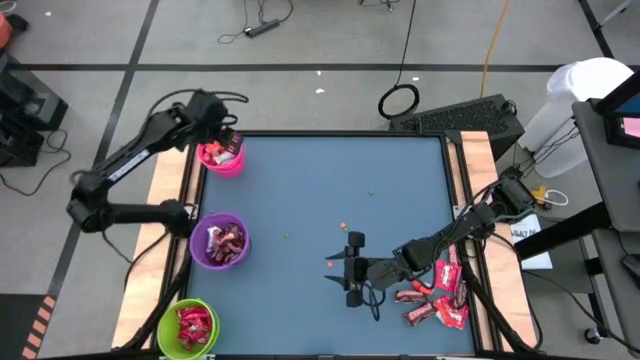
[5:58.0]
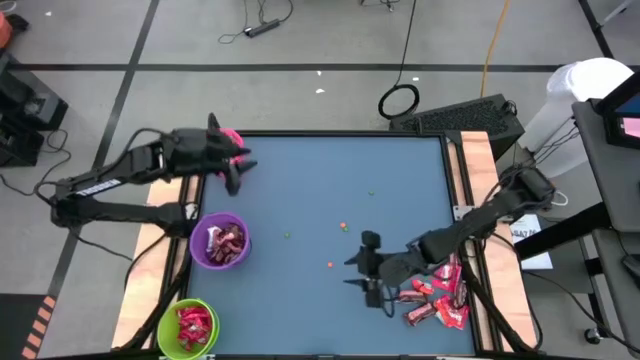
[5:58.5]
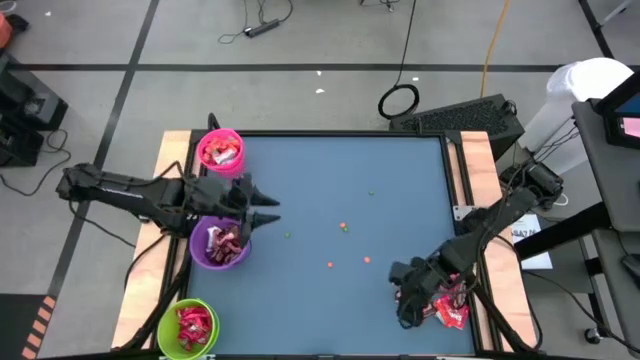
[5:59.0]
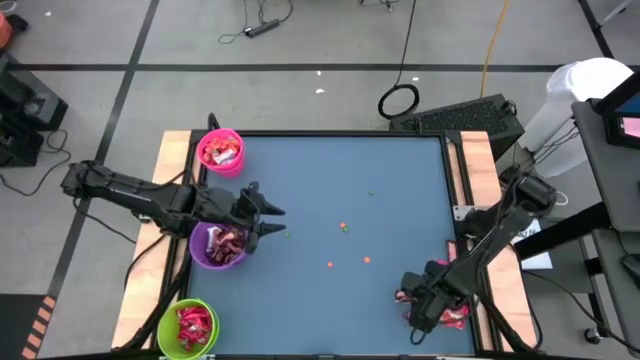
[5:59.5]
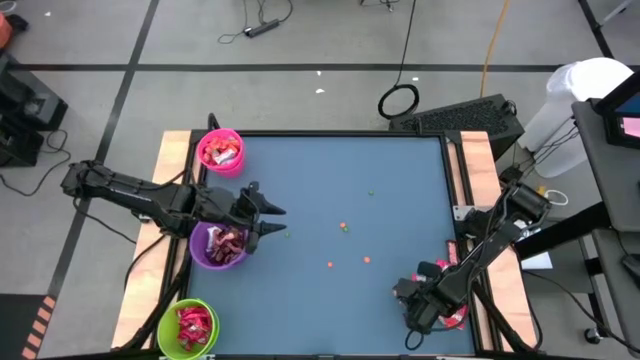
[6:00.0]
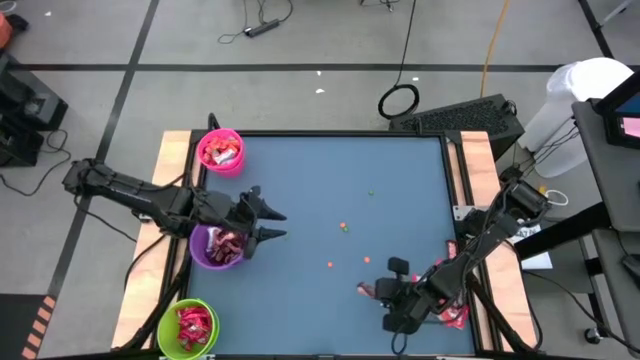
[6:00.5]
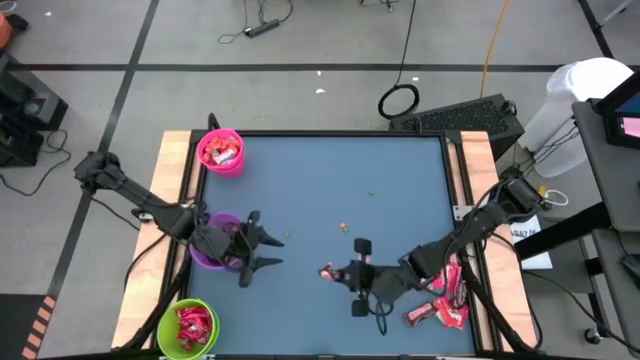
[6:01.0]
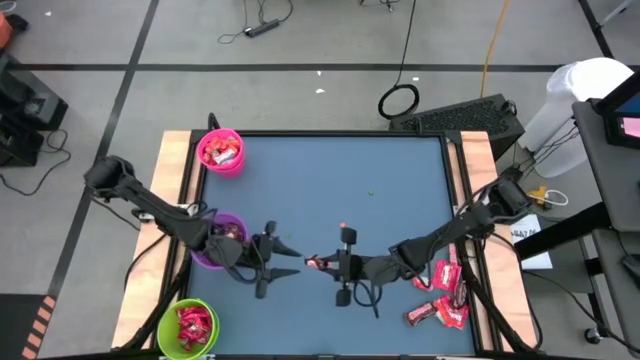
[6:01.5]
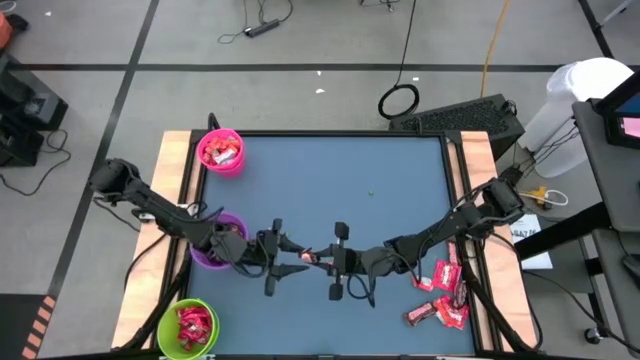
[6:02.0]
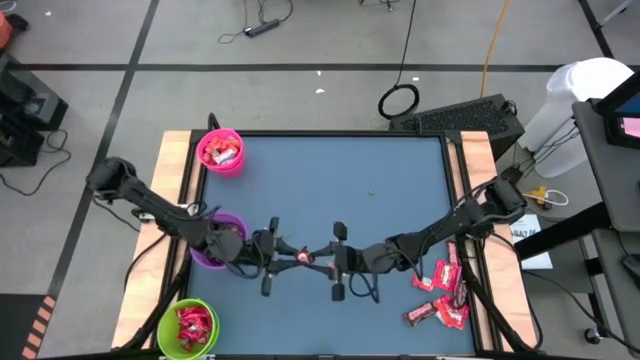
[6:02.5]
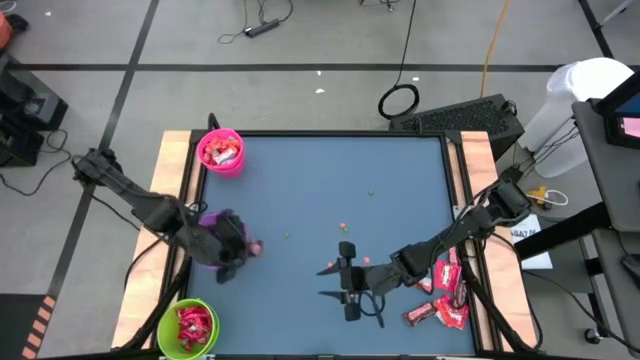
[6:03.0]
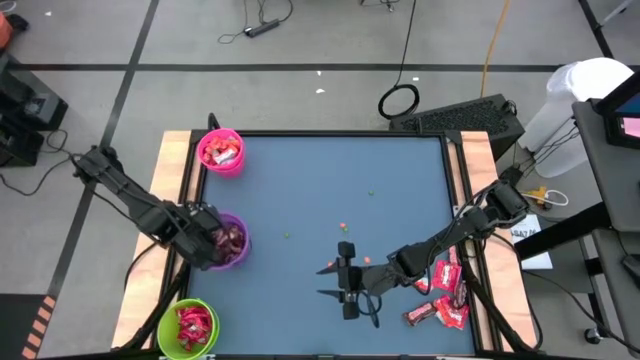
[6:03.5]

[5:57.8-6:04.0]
Task: Organize candy in baskets
Put the brown chocolate into the violet bucket

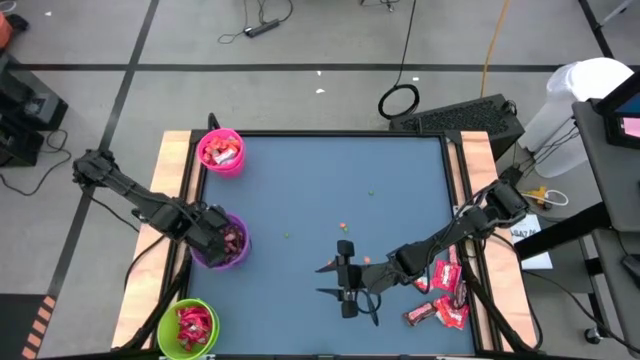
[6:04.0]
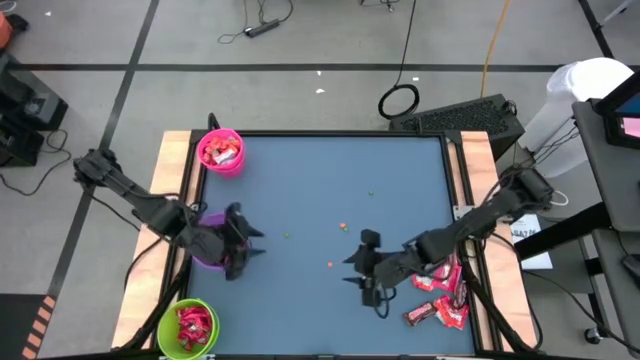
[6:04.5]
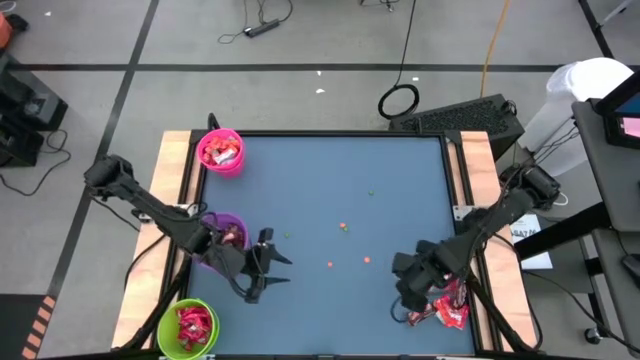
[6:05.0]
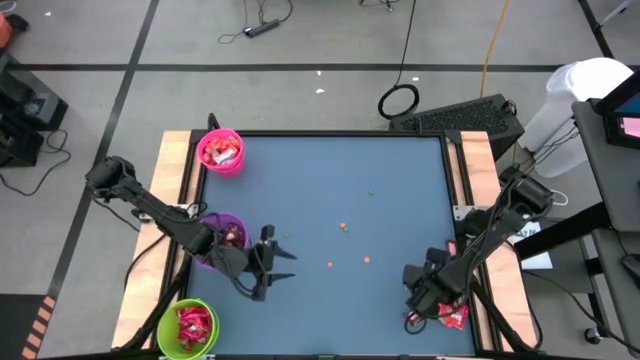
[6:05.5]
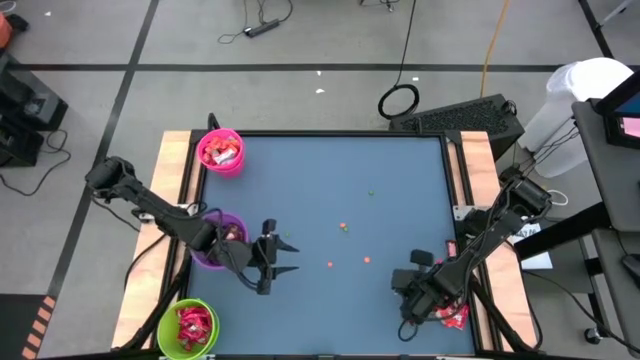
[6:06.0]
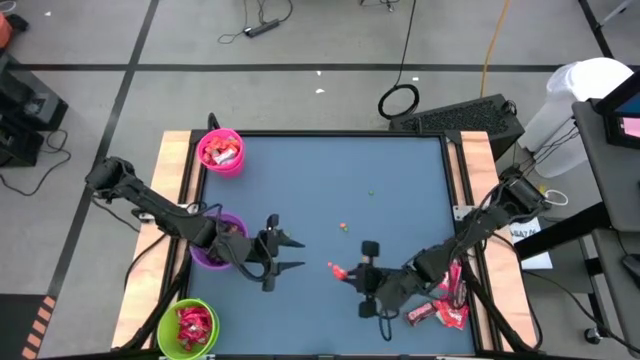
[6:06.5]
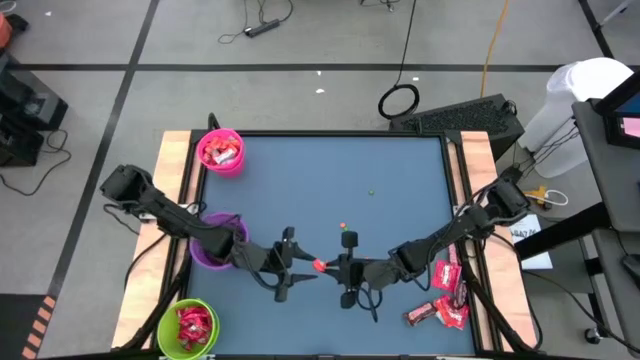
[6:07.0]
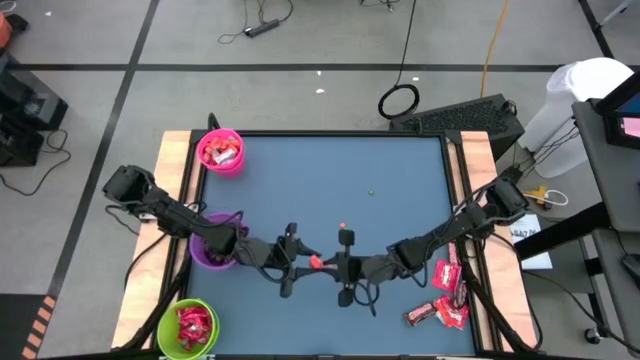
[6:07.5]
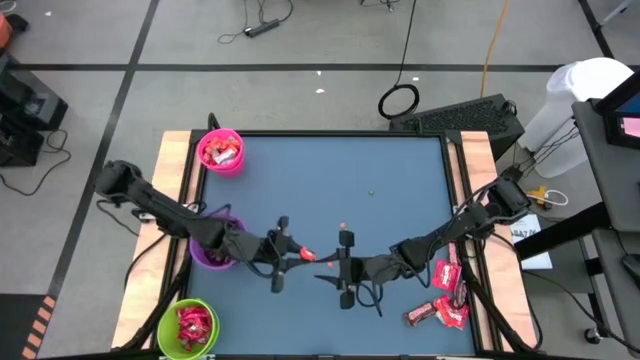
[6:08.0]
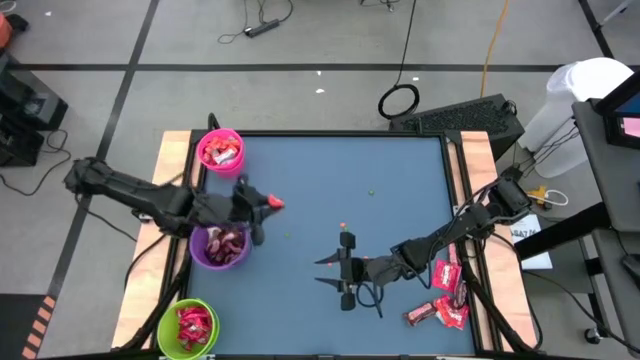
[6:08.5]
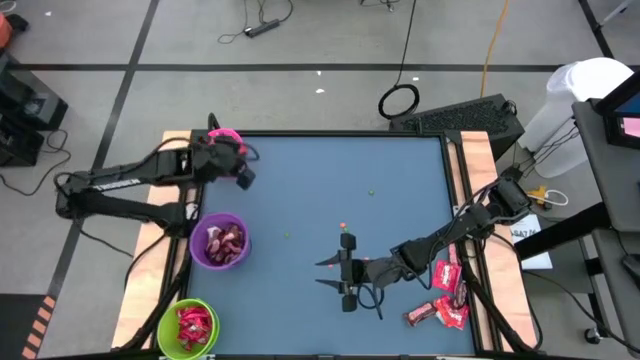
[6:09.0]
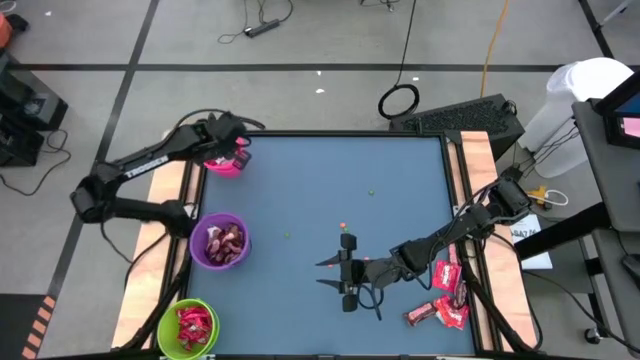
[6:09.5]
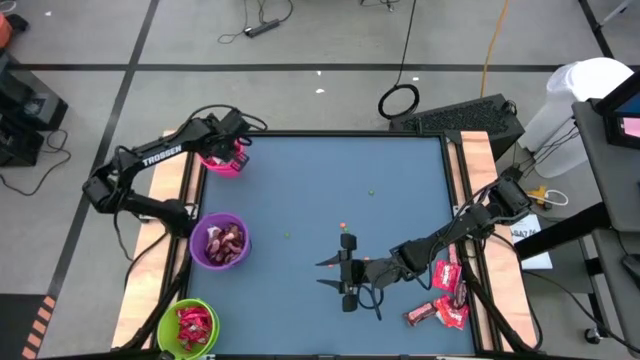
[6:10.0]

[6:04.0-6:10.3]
Put the orange chocolate into the pink bucket

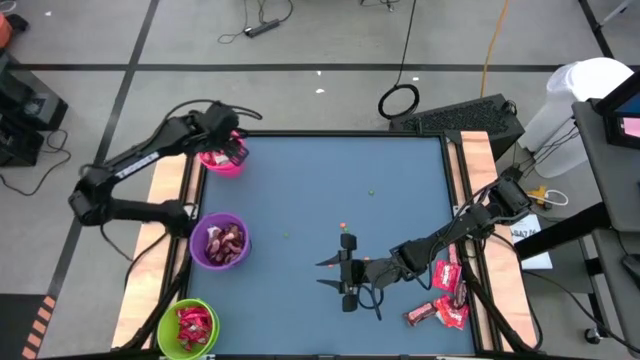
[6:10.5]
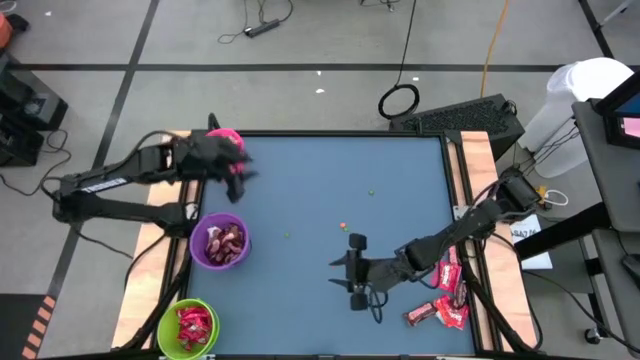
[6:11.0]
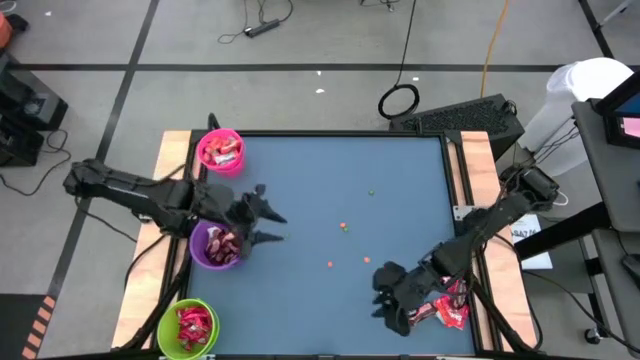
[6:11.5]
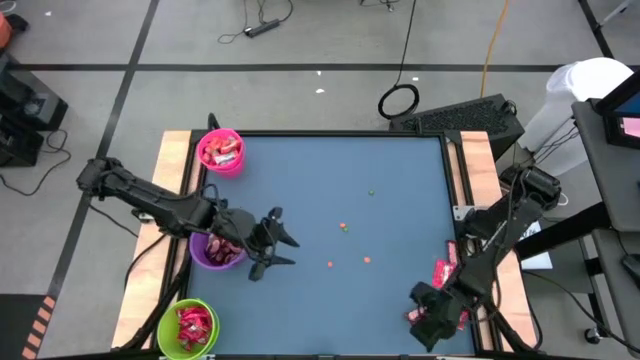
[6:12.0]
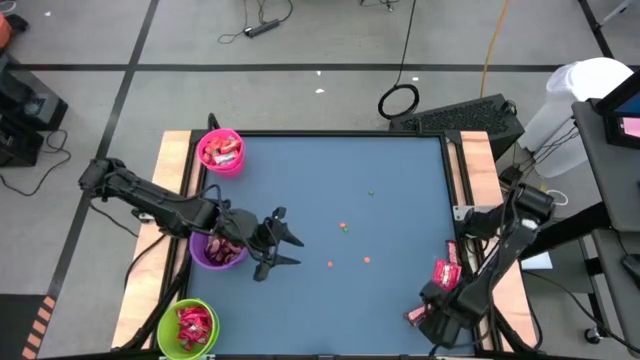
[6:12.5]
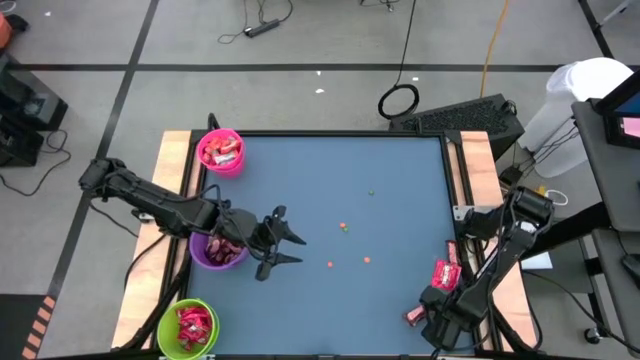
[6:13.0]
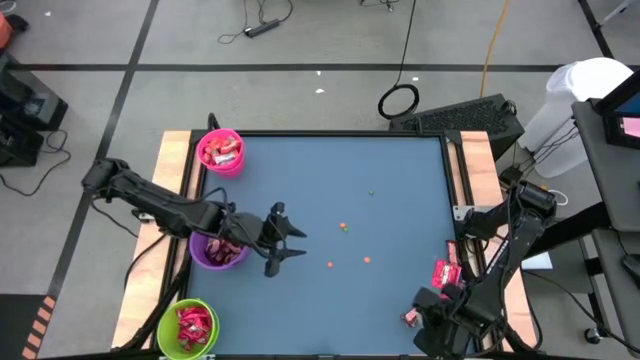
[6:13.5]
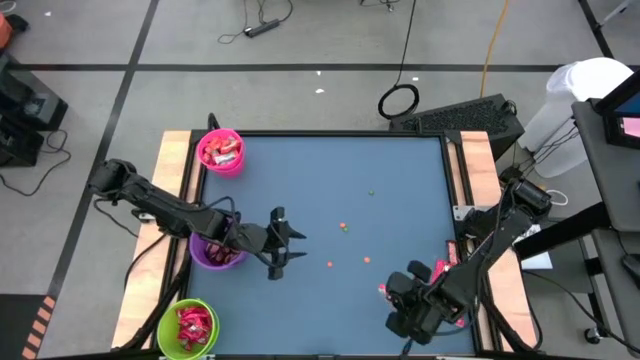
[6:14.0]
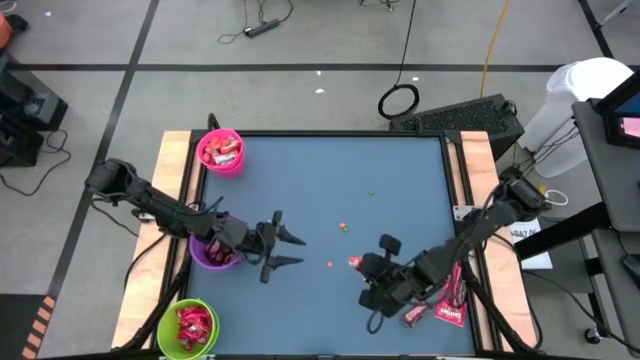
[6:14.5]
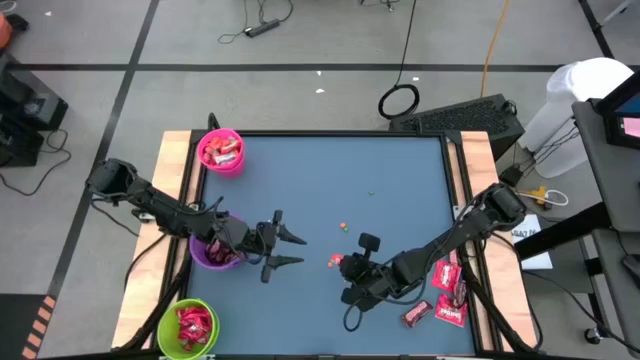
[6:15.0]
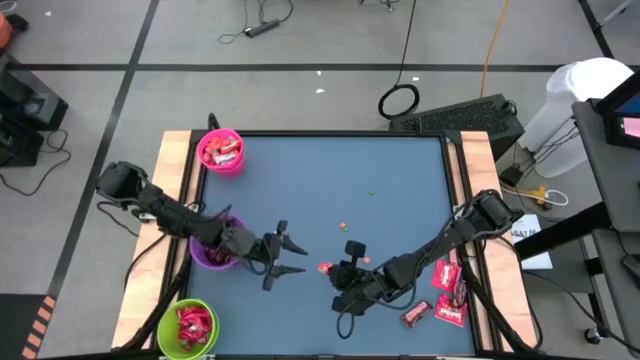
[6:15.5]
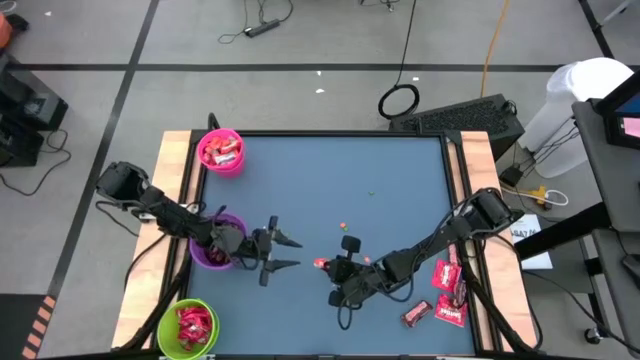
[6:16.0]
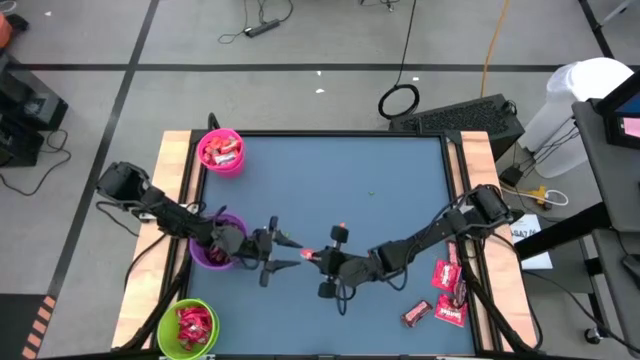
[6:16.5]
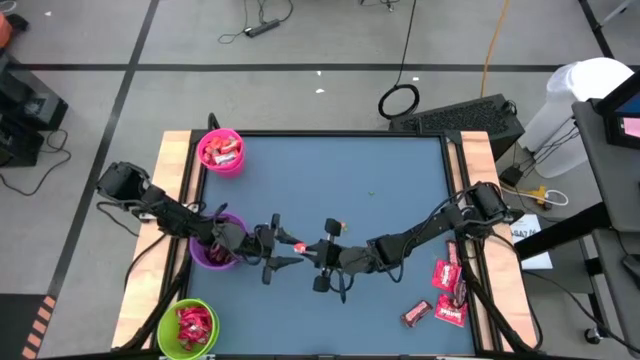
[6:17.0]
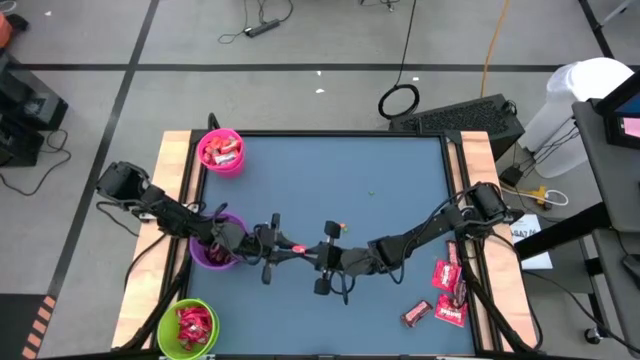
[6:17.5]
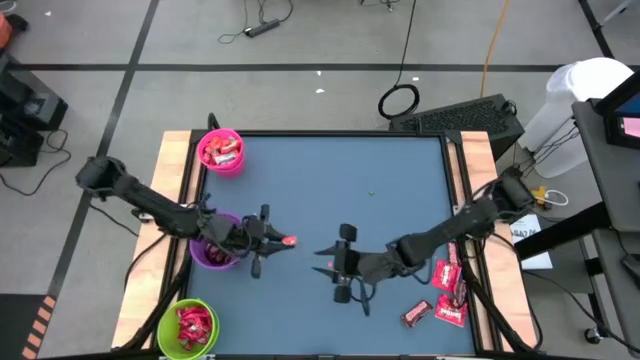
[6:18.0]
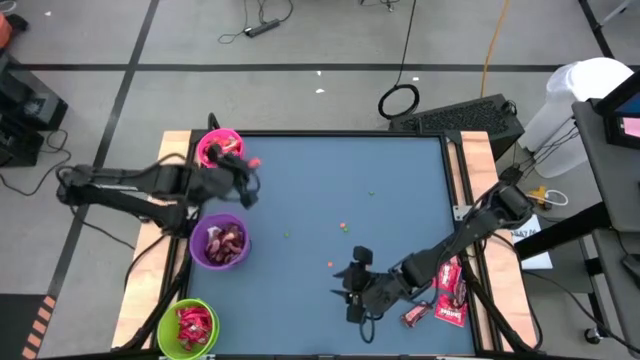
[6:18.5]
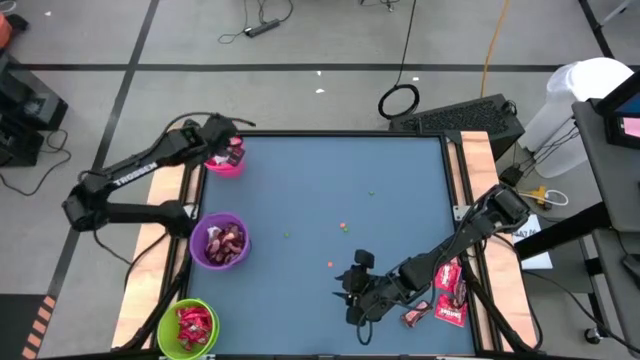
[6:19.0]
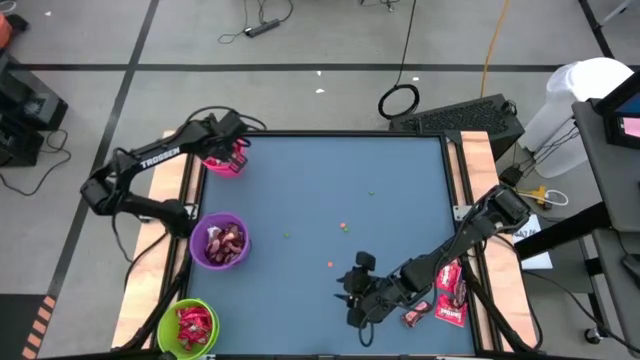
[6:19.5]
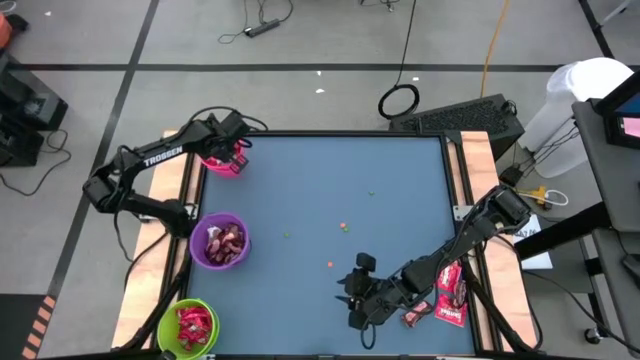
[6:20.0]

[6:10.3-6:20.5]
Put the orange chocolate into the pink bucket
